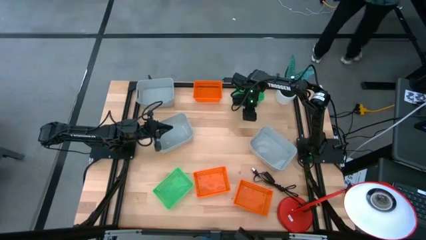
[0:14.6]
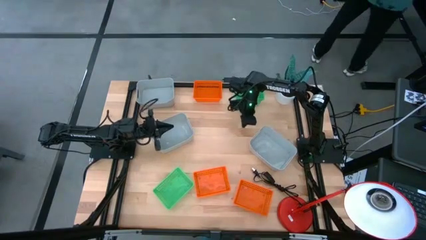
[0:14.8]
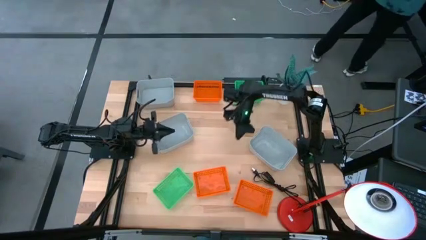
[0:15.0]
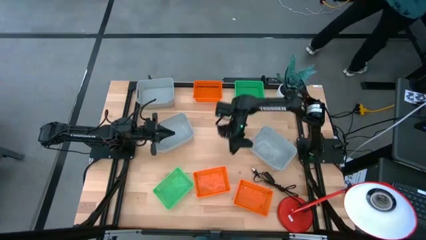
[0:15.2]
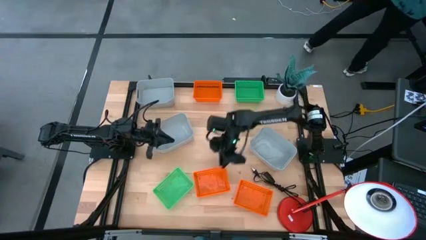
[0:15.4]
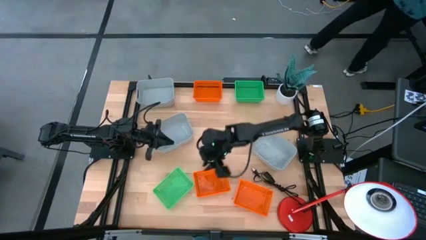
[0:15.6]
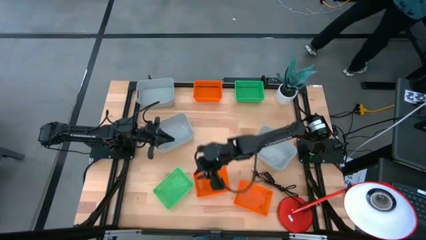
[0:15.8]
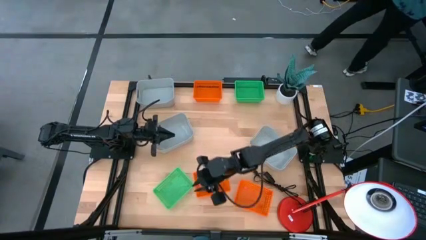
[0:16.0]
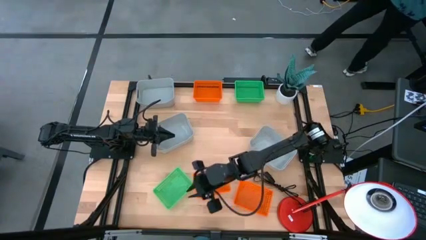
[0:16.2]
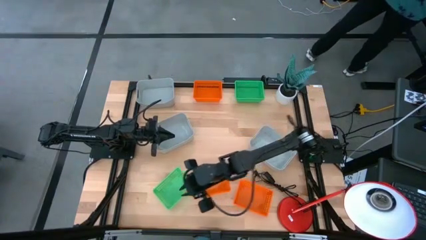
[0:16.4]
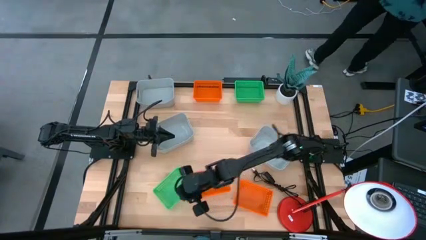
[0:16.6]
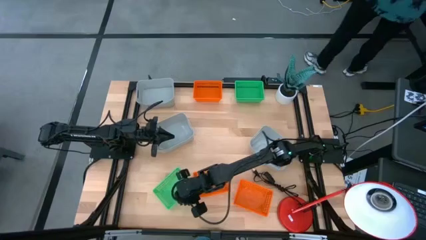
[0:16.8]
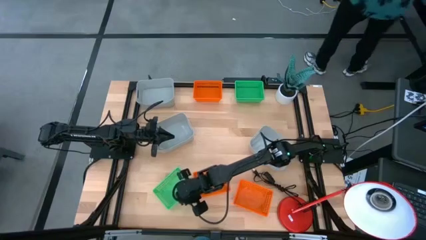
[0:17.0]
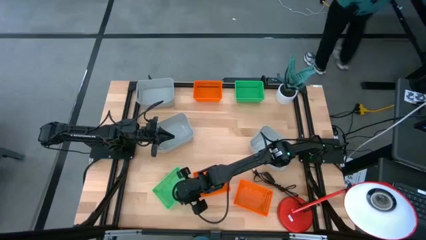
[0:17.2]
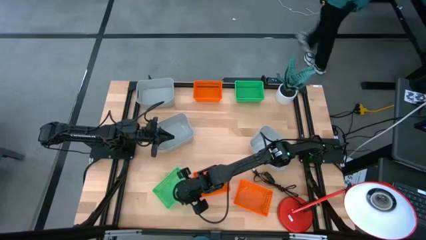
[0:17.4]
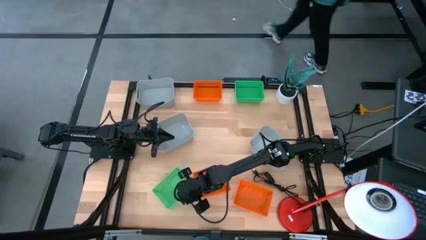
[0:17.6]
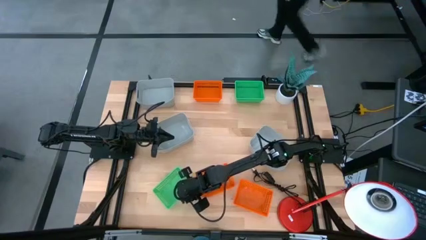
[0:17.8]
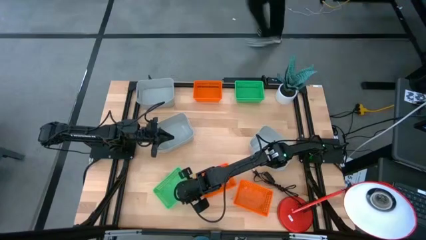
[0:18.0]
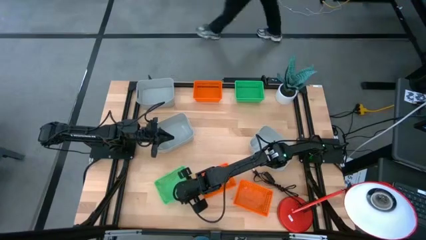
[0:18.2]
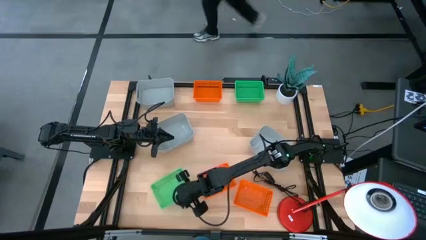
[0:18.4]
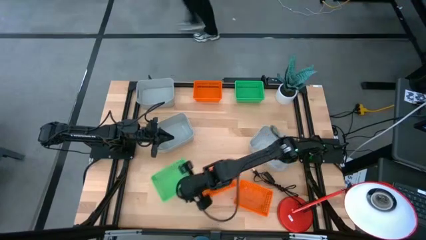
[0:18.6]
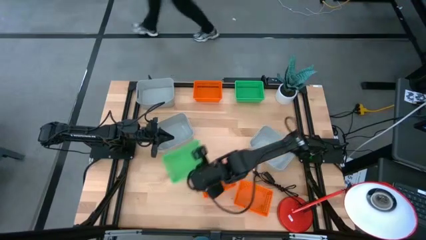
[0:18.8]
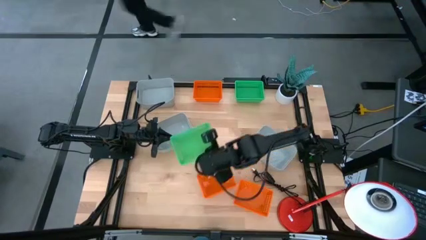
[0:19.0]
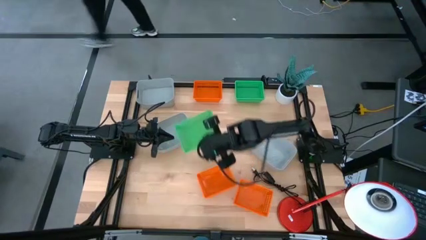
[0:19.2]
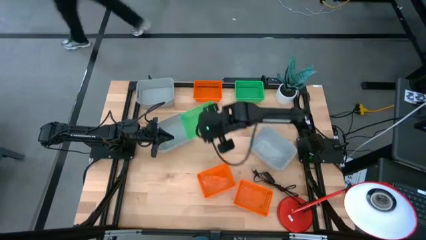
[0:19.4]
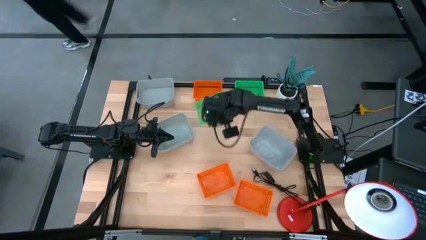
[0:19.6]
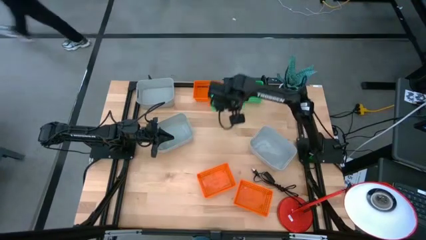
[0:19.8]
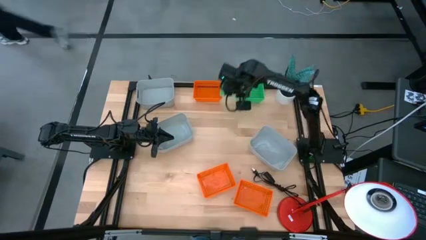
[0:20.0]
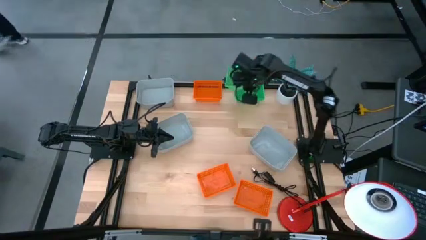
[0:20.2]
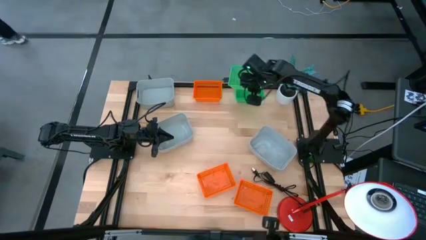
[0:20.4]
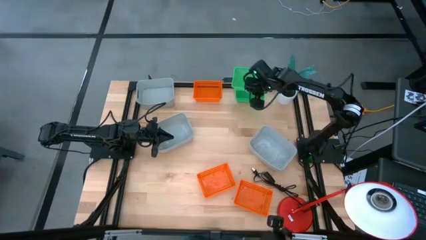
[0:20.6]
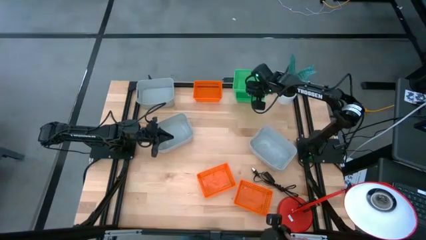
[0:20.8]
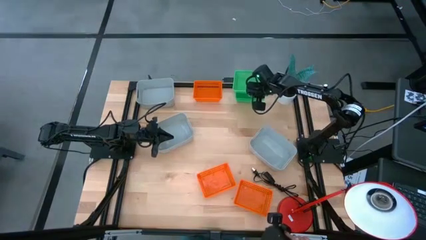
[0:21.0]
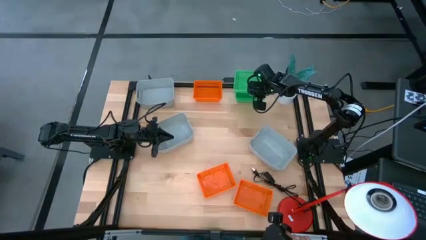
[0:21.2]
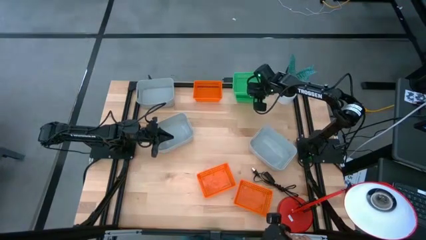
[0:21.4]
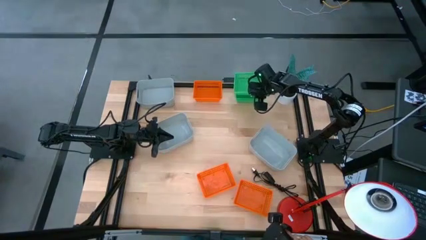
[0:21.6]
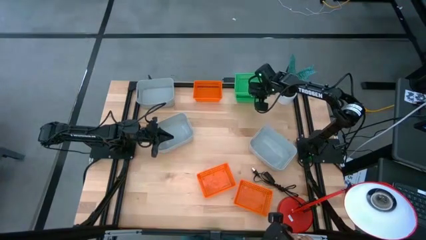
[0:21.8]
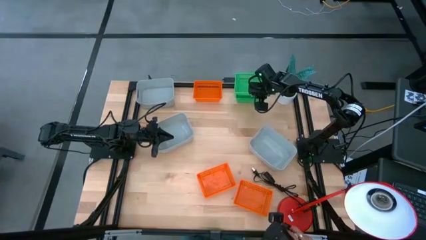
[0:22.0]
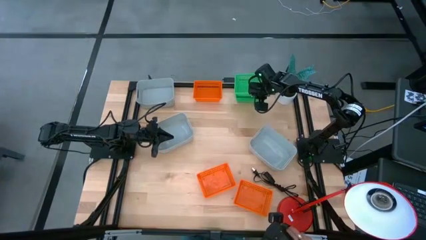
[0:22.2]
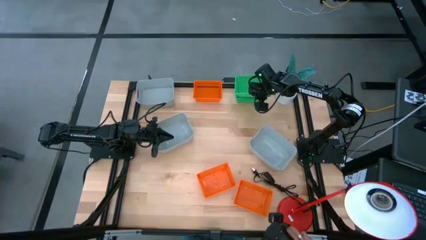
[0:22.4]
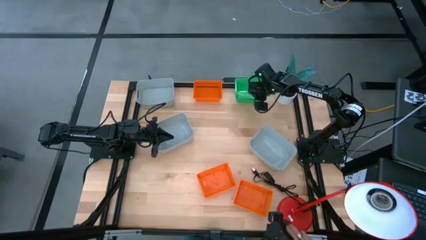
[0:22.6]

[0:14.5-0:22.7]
Stack the bottom green bin on top of the top green bin

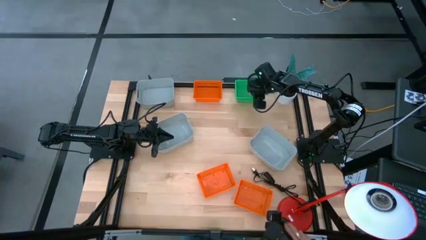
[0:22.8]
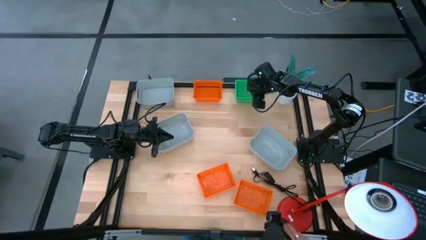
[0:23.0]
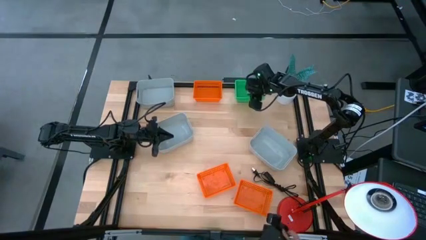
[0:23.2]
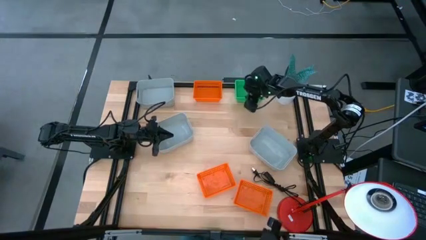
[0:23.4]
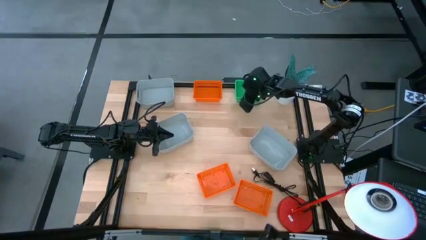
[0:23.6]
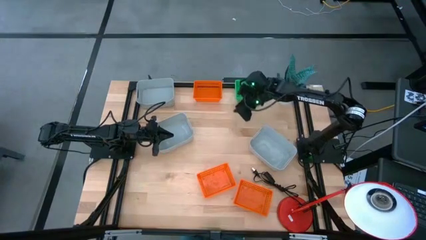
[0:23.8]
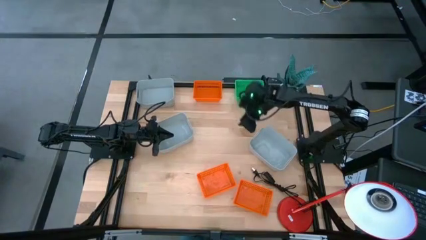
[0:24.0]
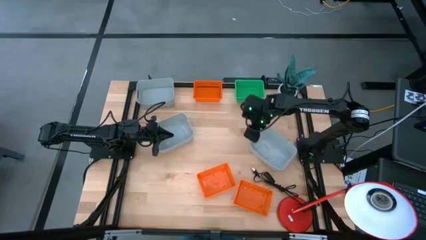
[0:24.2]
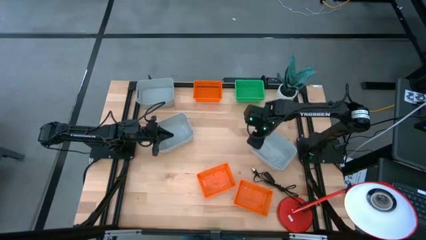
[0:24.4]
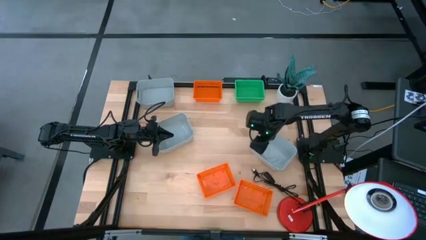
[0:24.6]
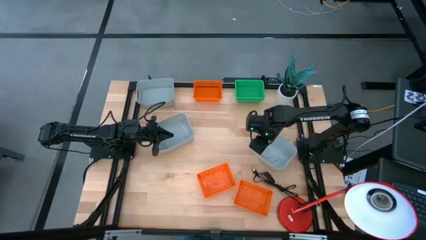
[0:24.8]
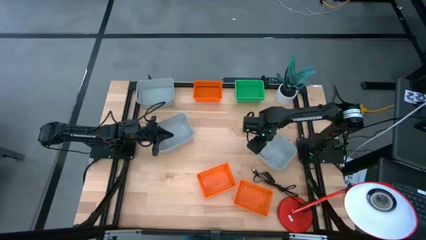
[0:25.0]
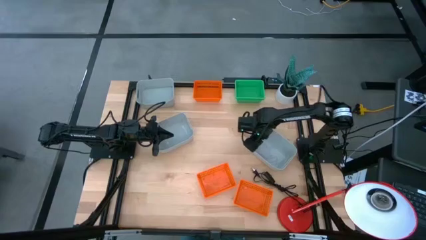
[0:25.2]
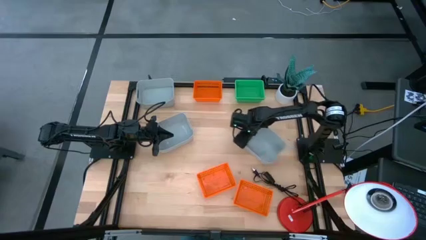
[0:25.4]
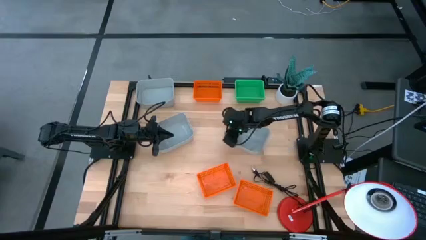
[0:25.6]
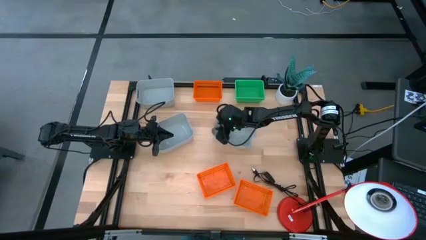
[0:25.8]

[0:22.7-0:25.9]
Move the bottom right gray bin to the center of the table
